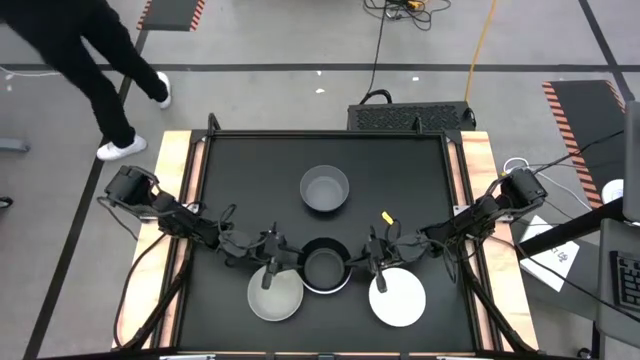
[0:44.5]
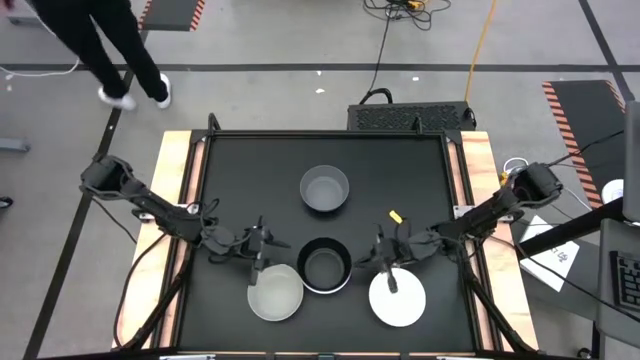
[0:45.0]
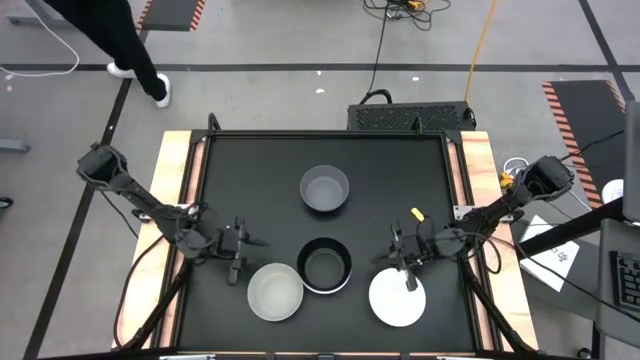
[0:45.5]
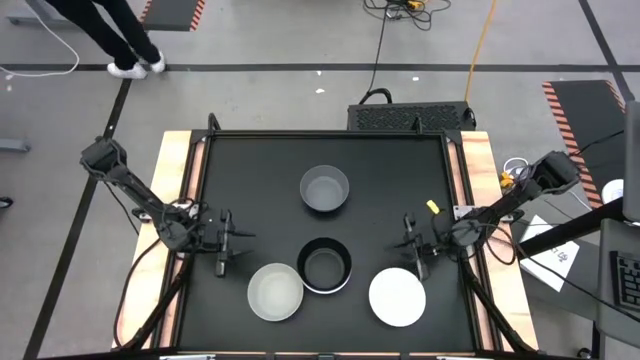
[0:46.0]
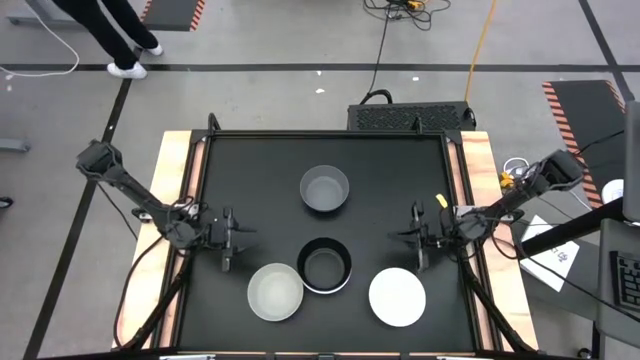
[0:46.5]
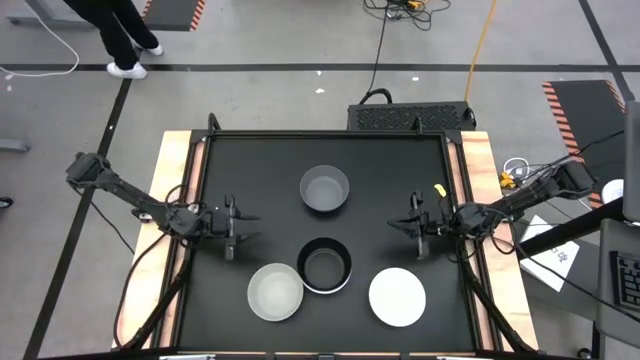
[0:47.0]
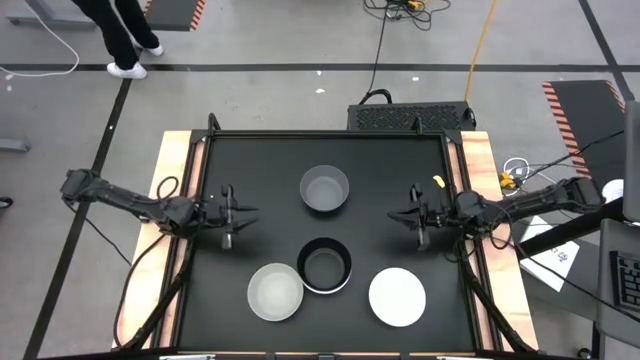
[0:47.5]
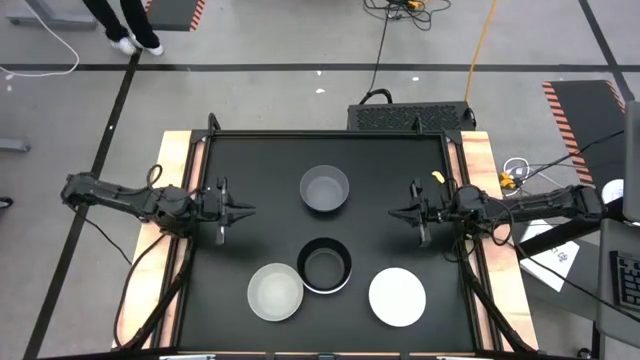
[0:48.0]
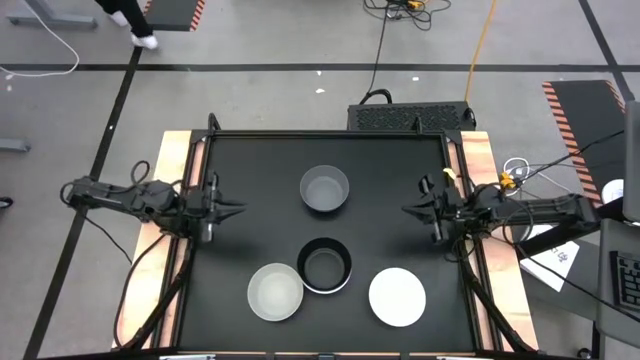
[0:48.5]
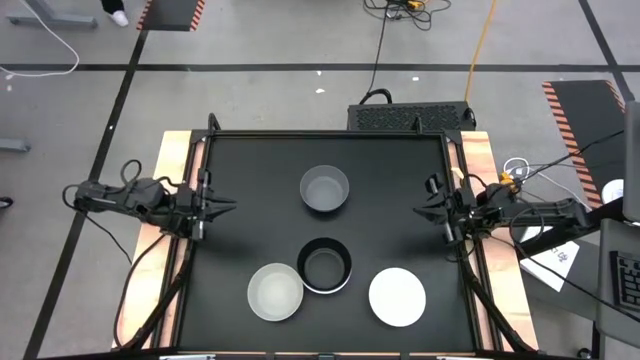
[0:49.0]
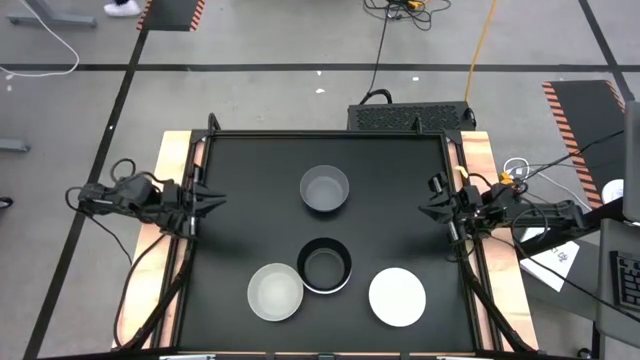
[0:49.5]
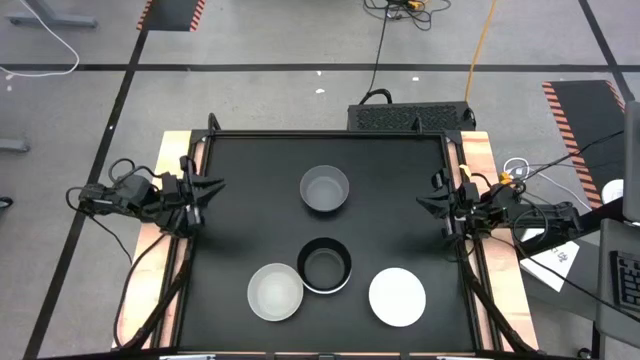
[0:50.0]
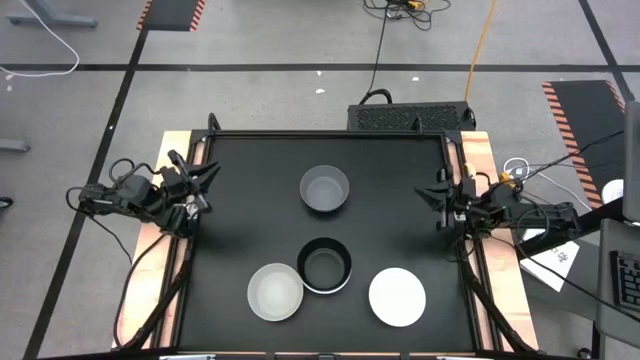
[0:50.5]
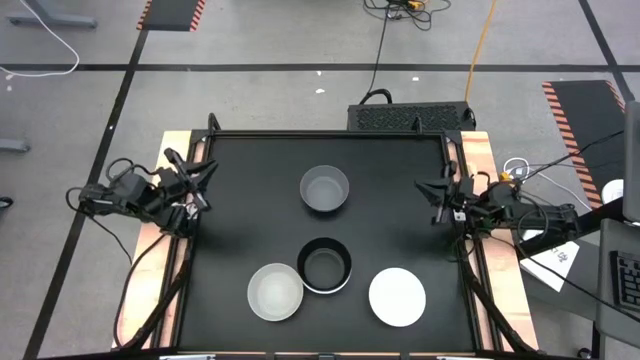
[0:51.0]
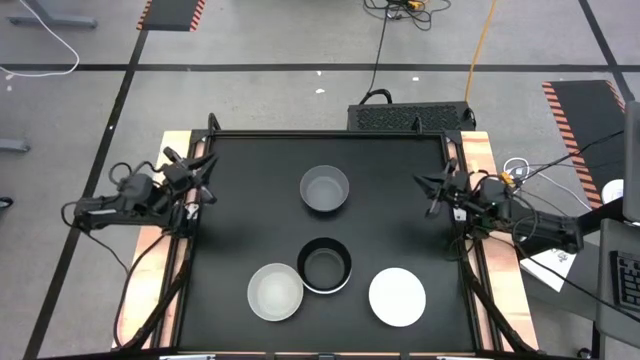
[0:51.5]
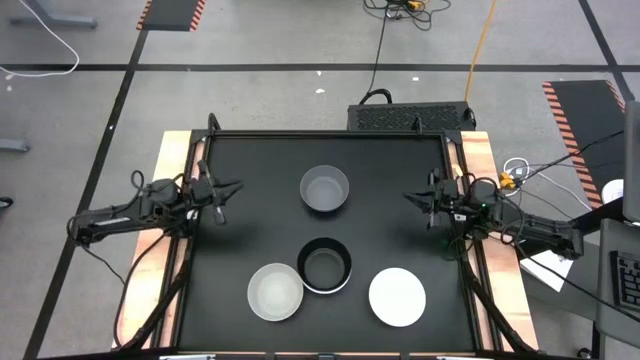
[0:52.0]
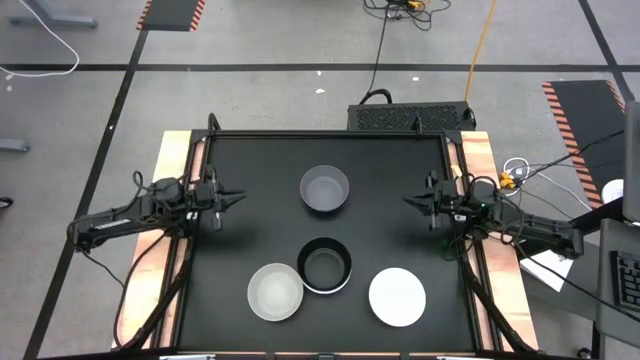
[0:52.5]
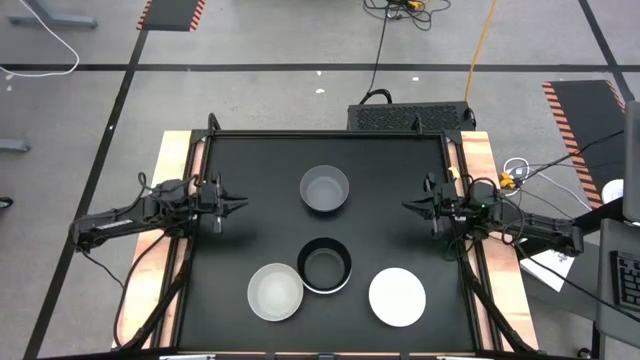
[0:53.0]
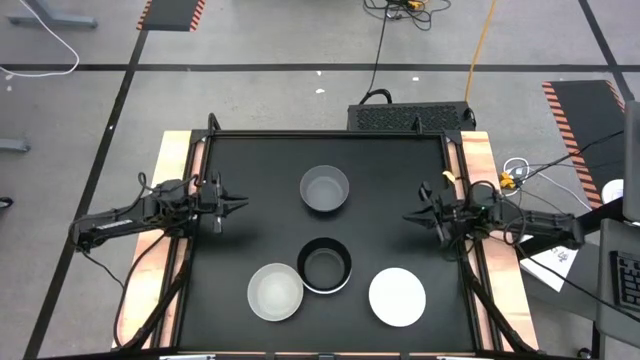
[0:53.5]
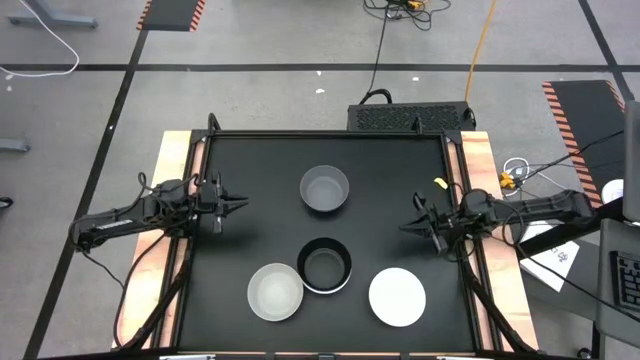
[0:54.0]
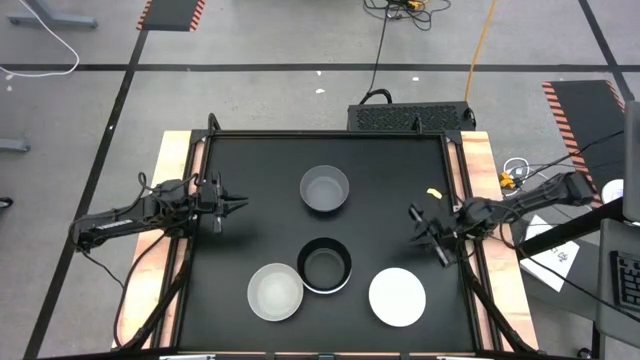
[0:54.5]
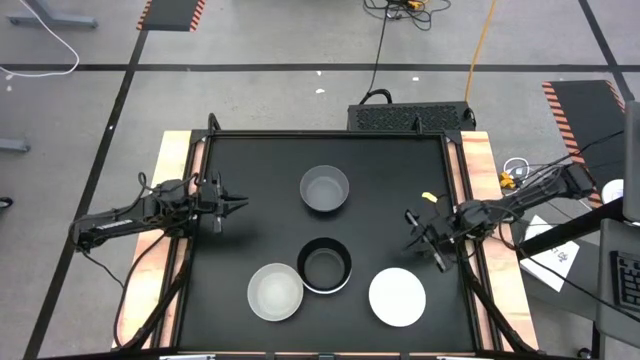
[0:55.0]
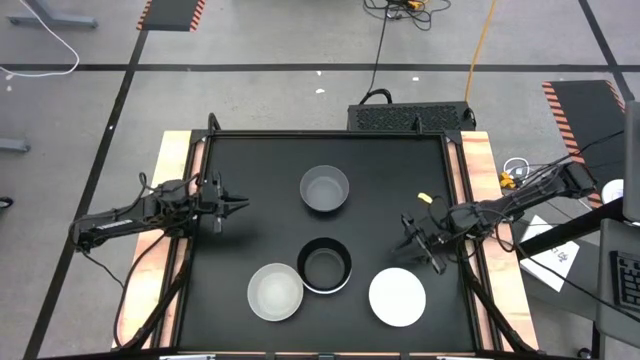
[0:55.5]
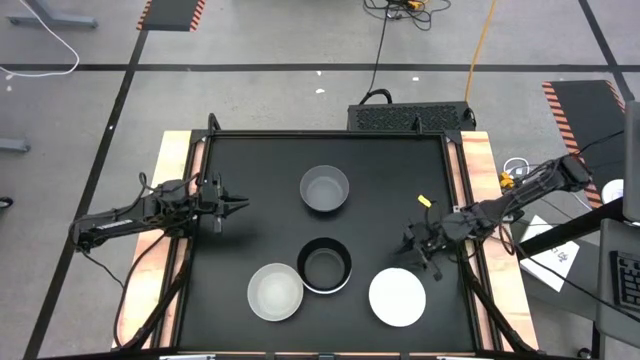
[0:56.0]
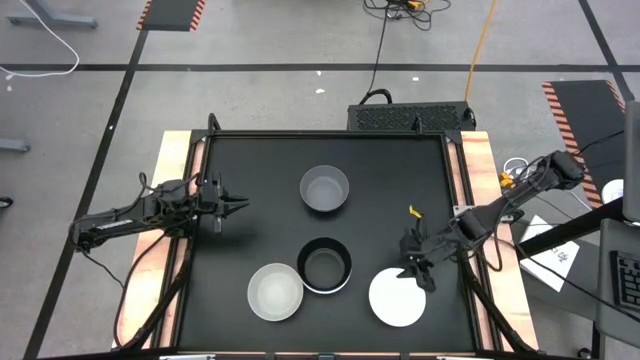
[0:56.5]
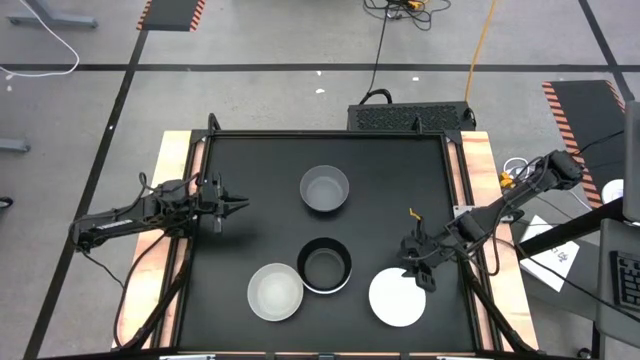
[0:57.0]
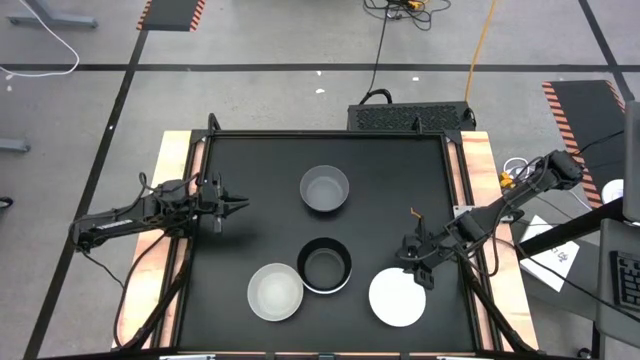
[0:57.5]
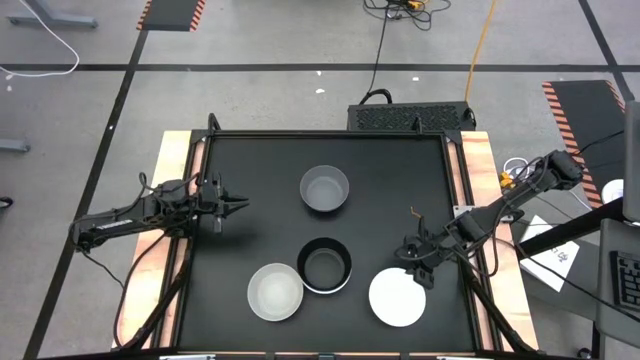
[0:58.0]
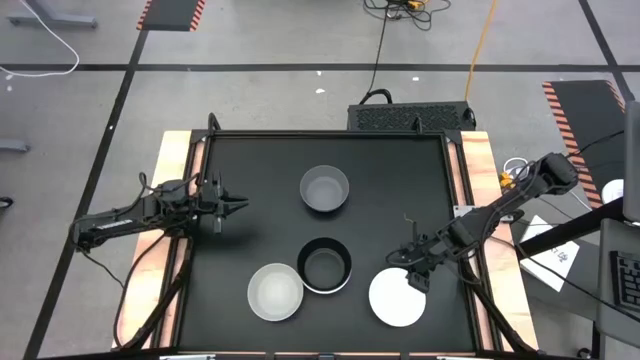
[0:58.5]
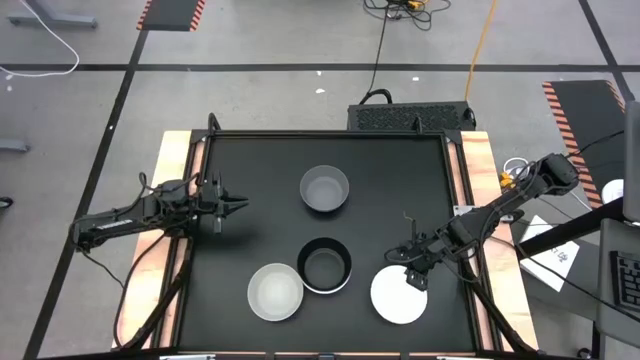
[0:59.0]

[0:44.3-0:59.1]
Task: Nest bowls inside each other
Stack the white bowl on the black bowl

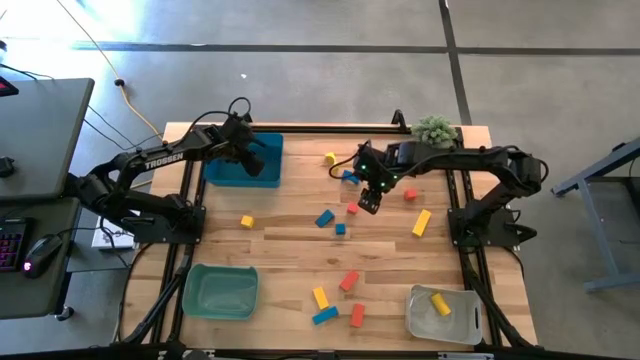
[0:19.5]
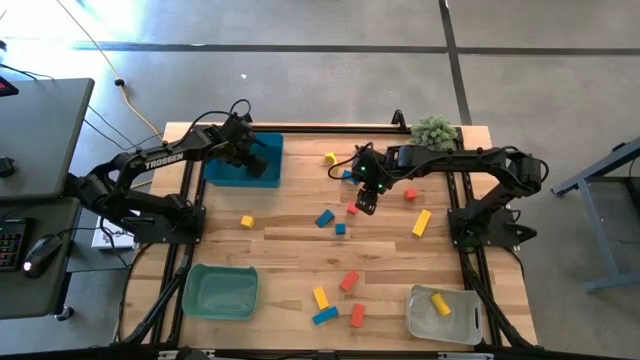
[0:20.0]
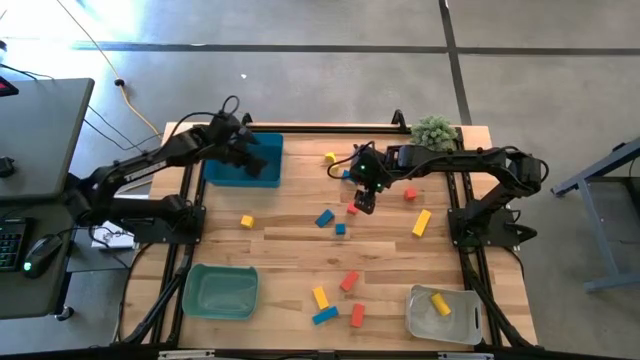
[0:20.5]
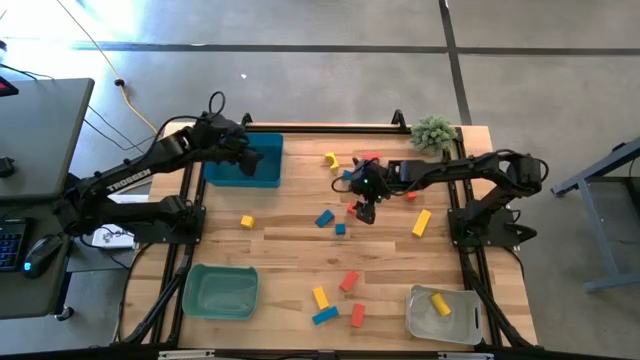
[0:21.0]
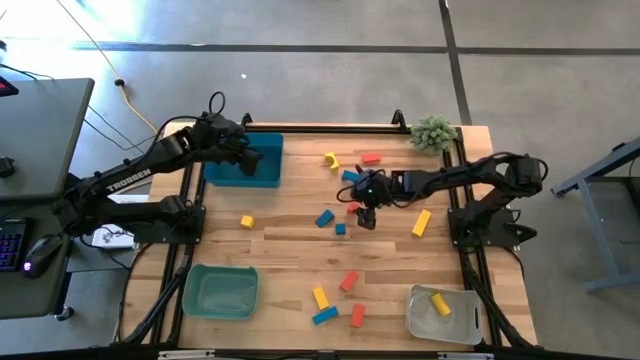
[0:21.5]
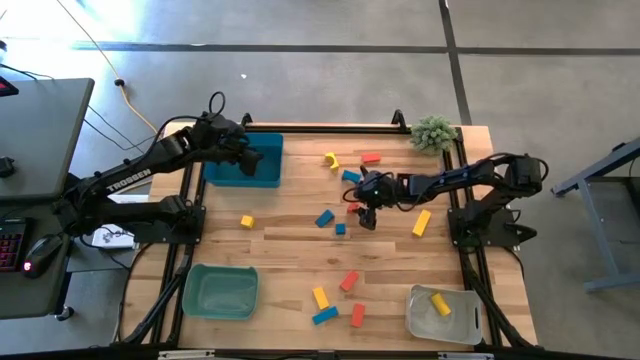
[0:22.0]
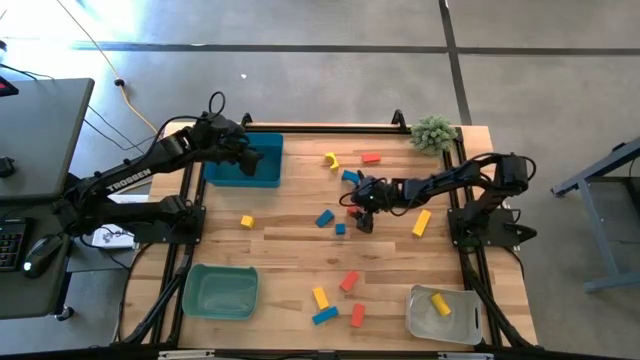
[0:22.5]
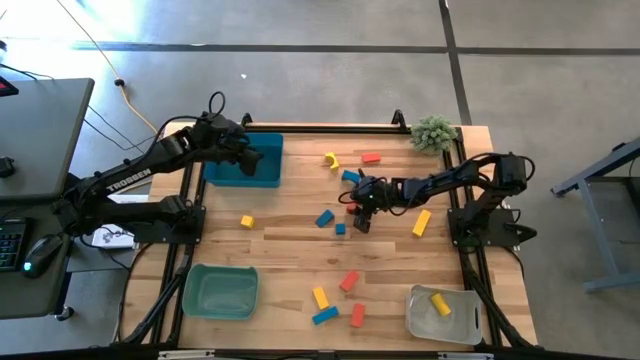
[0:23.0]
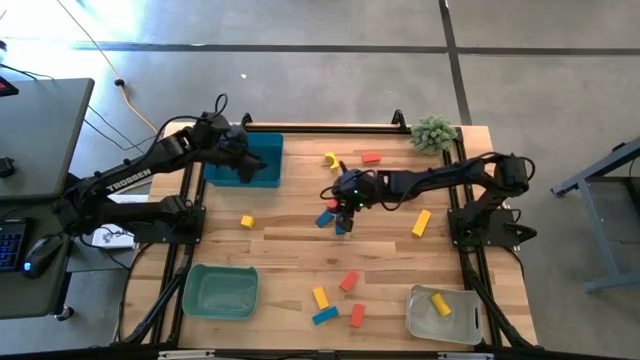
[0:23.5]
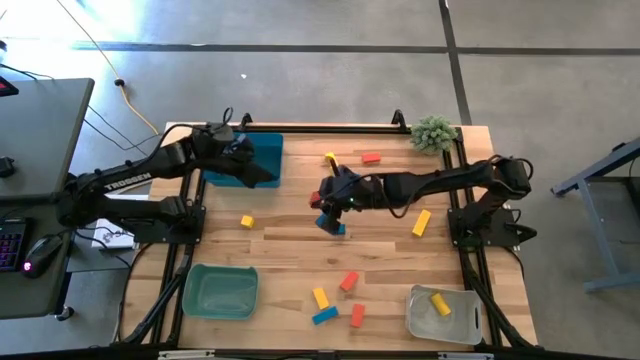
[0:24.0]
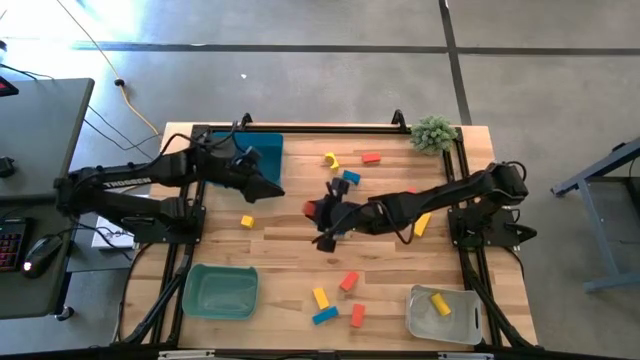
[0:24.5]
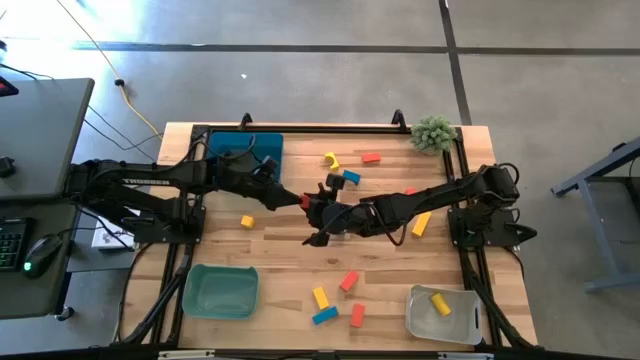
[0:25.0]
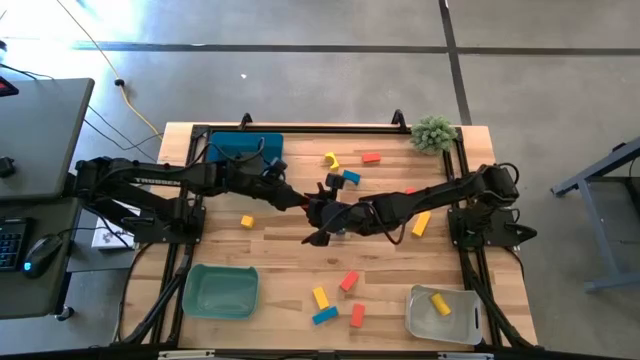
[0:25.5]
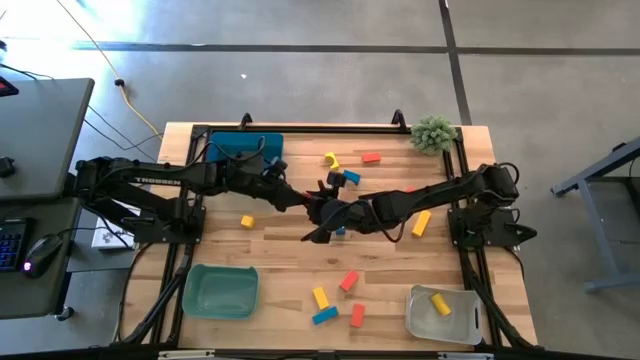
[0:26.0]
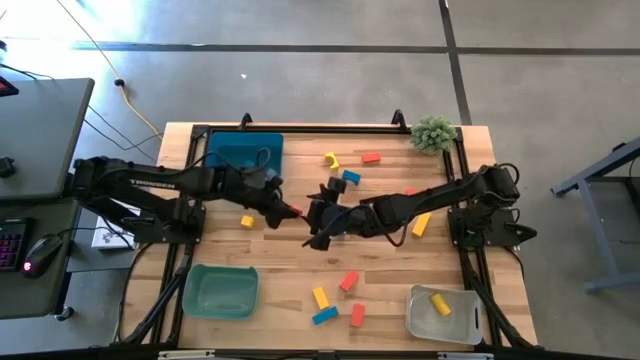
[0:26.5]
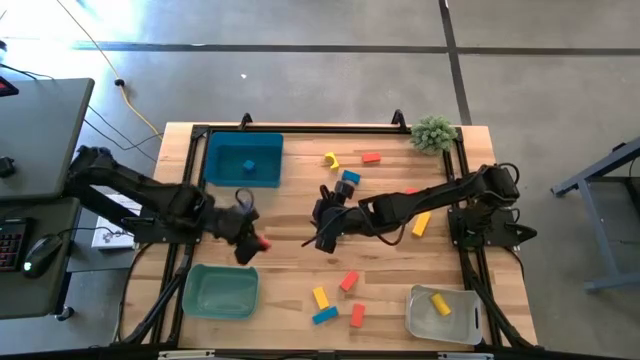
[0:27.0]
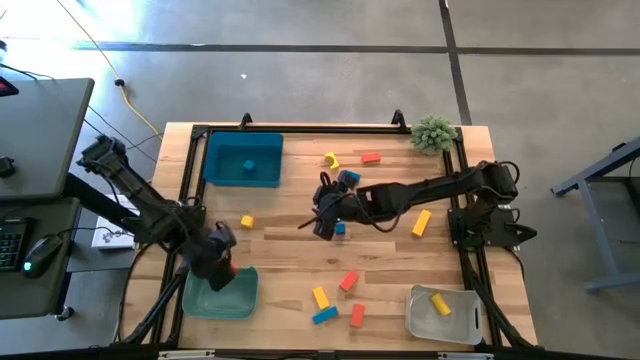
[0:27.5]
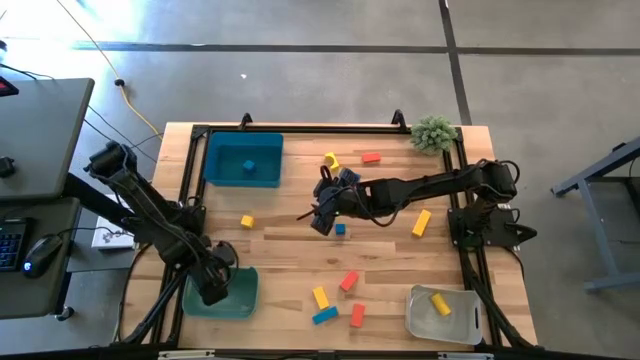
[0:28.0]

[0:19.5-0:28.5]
Task: Sort & place blocks by color
Put the orange block into the green bin
